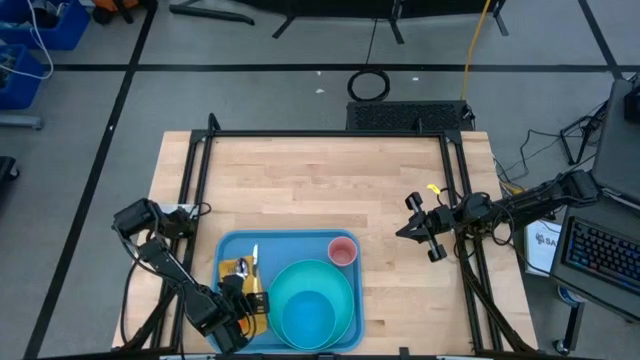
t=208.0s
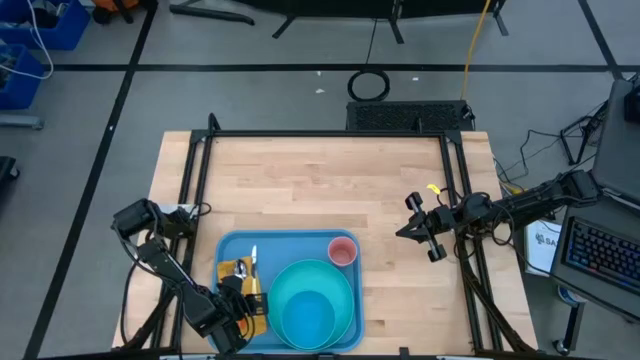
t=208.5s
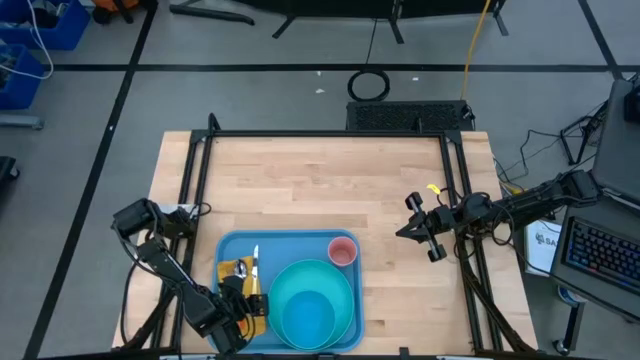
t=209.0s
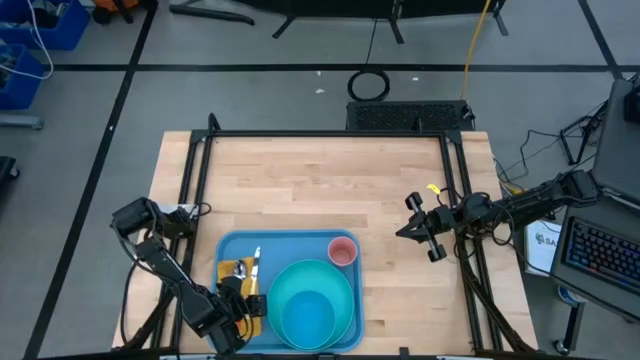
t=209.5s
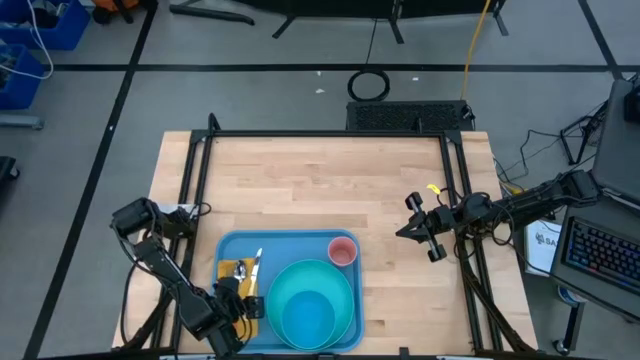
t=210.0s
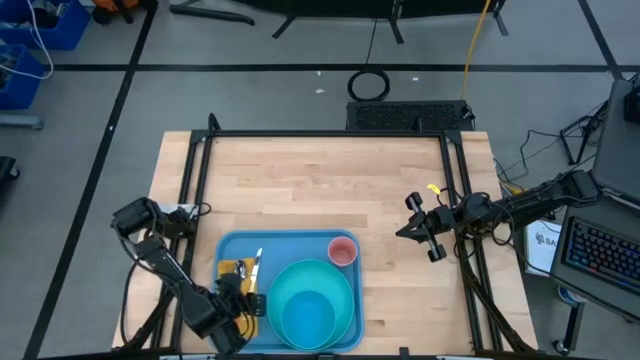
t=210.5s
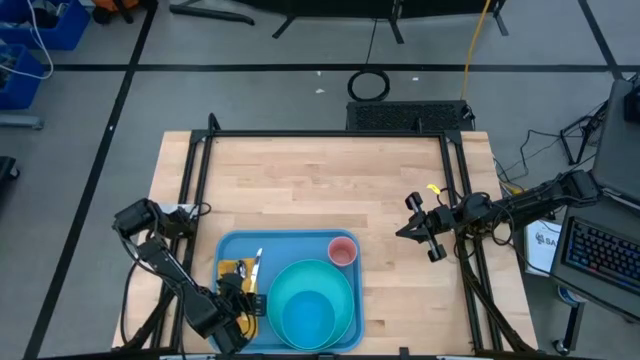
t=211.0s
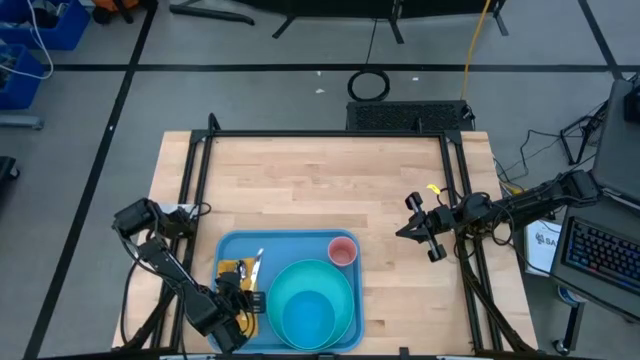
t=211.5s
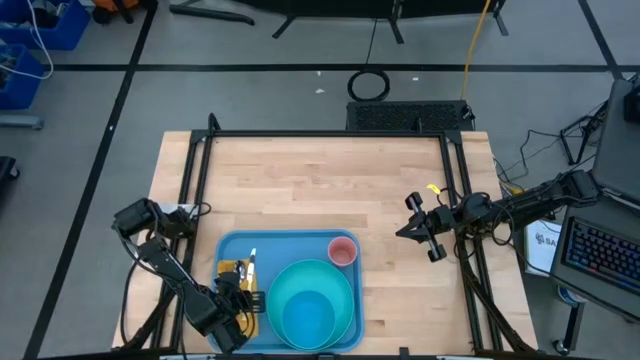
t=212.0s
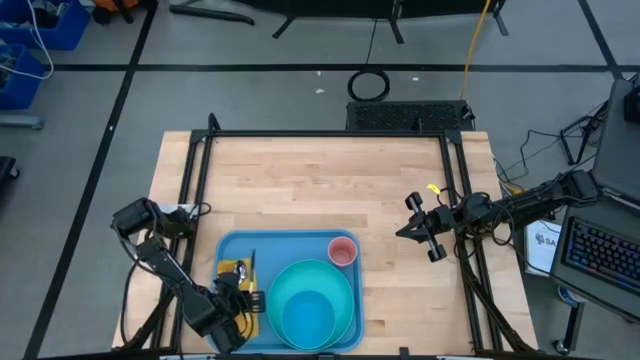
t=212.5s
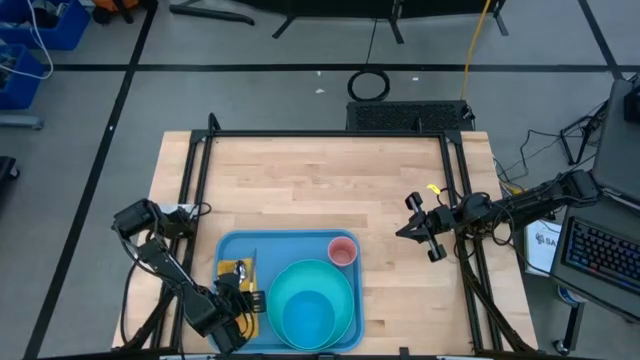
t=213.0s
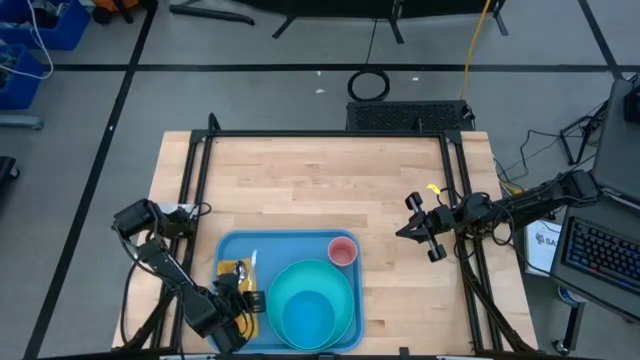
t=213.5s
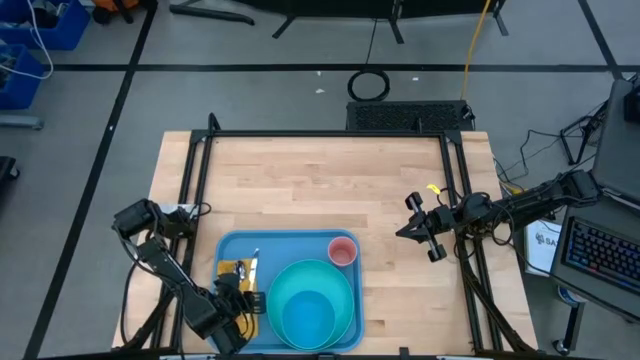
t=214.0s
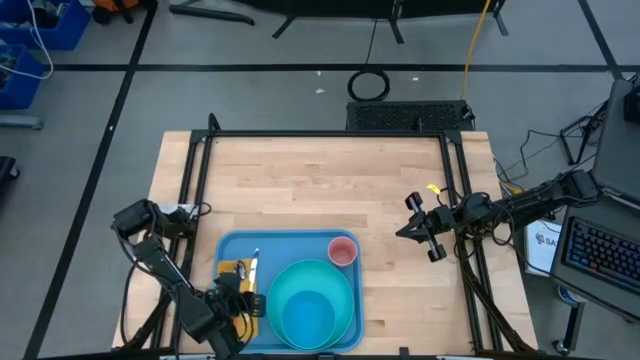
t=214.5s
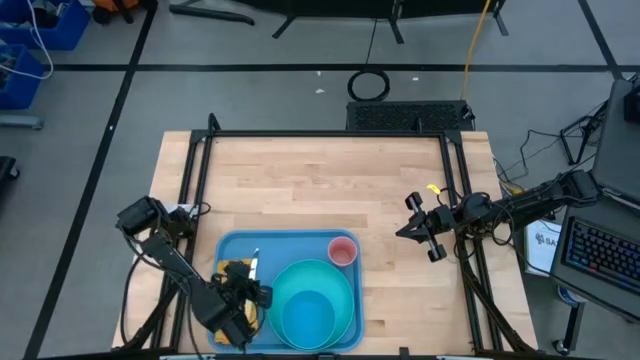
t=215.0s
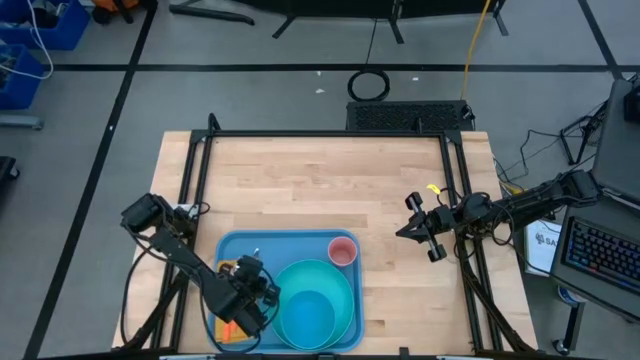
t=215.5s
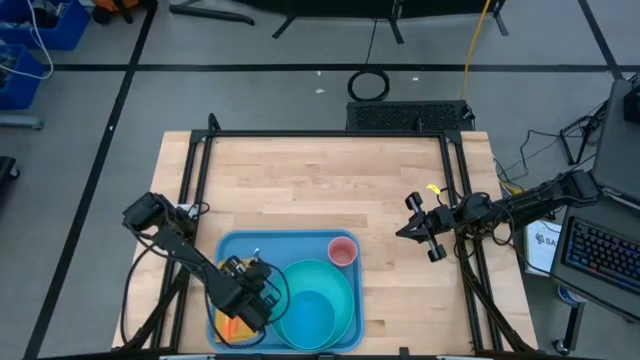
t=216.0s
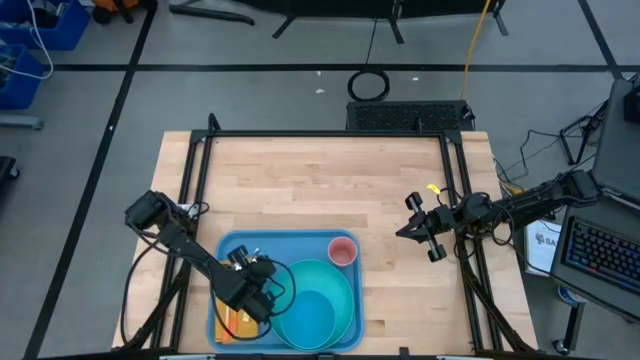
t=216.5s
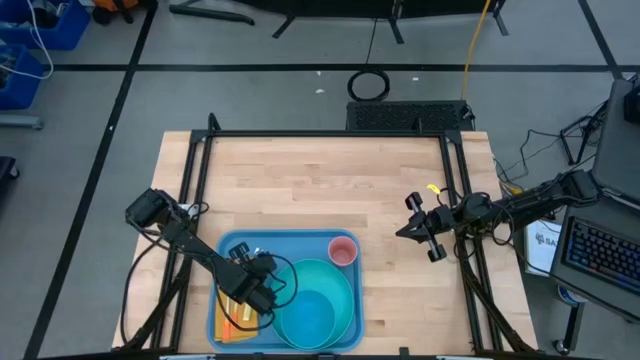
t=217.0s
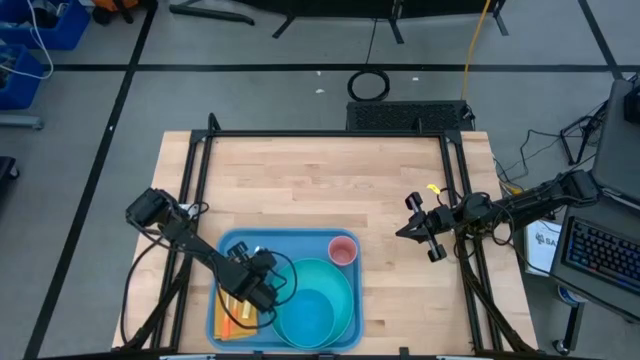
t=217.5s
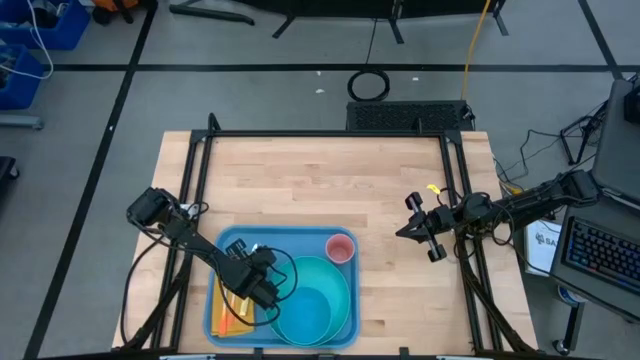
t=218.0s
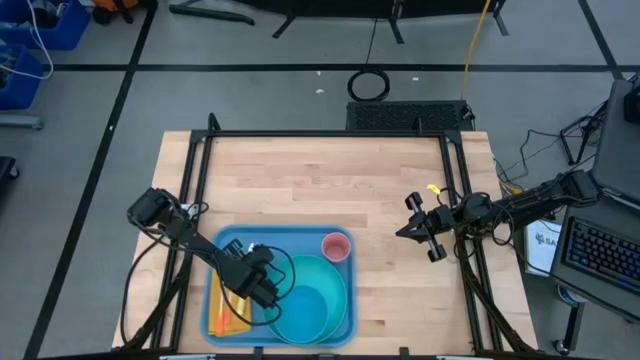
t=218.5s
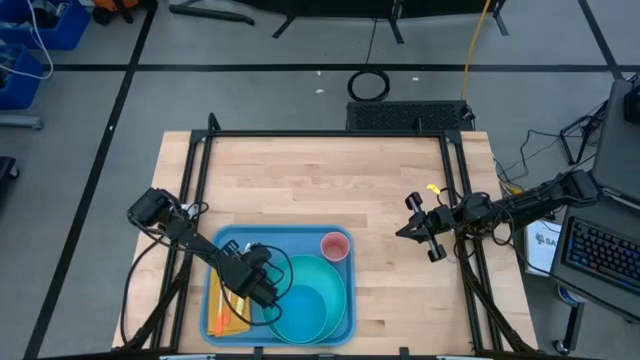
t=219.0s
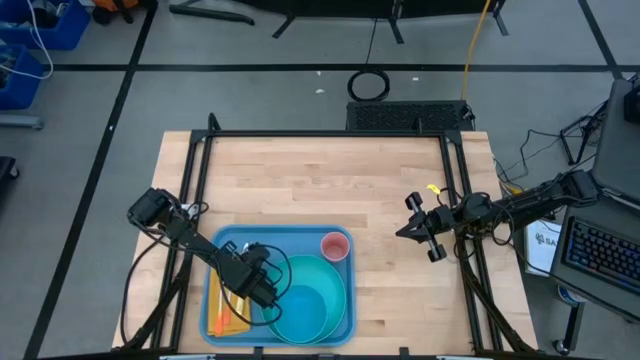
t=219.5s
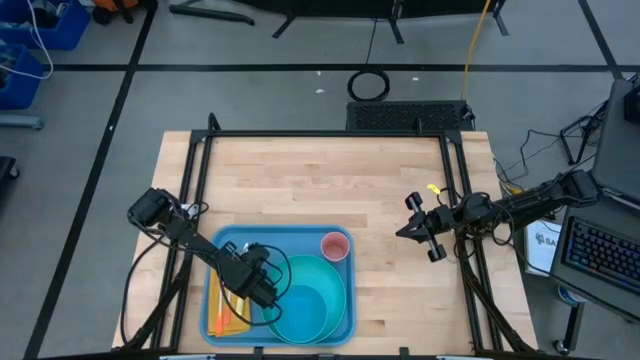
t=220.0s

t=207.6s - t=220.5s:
Task: Set up tray
Put the light yellow table knife to the right of the orange spoon on the yellow table napkin

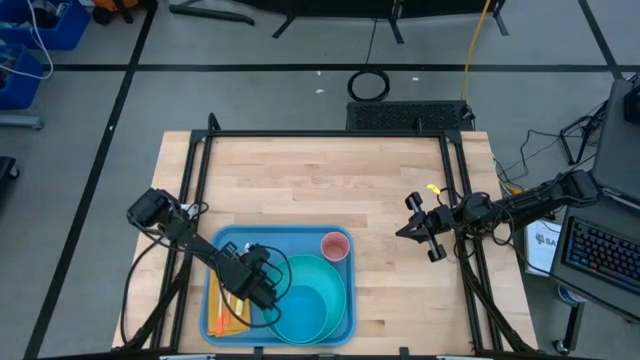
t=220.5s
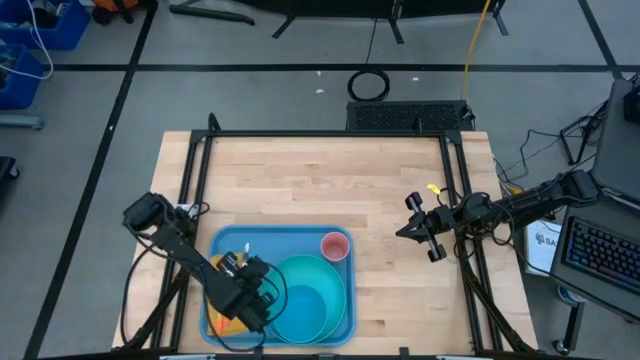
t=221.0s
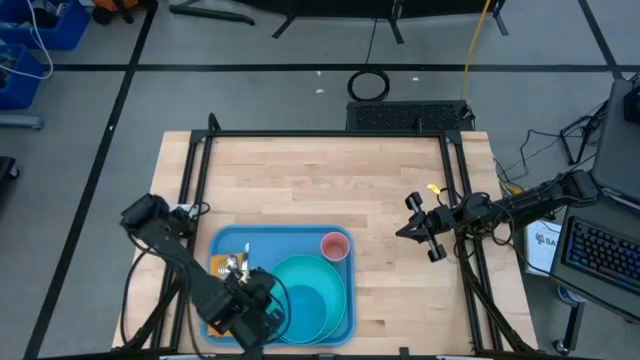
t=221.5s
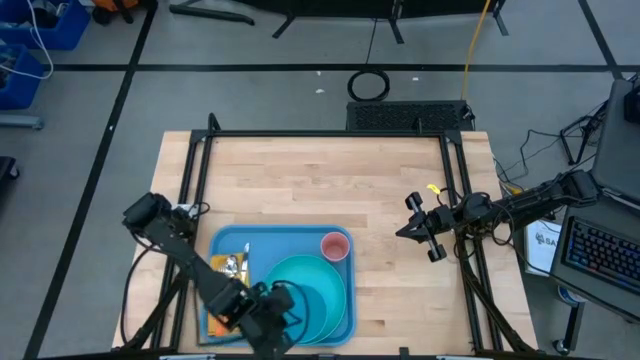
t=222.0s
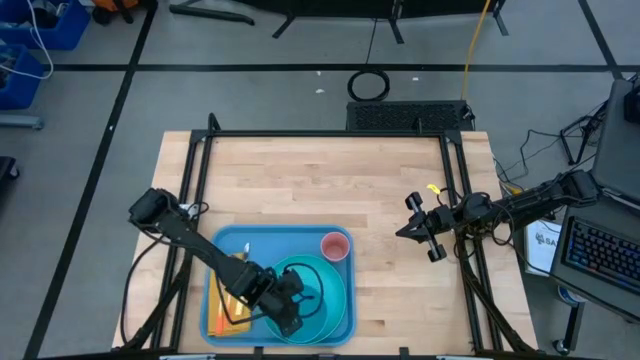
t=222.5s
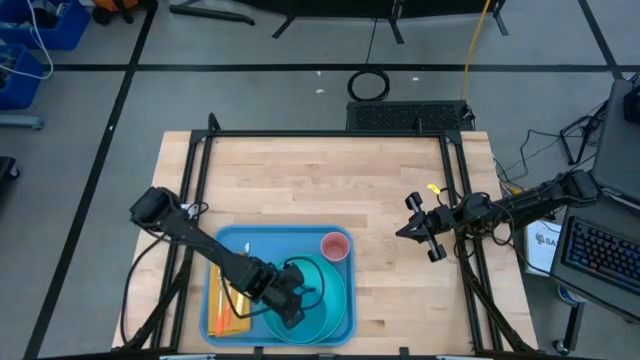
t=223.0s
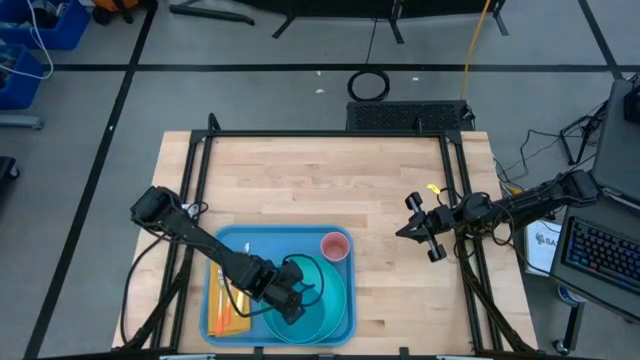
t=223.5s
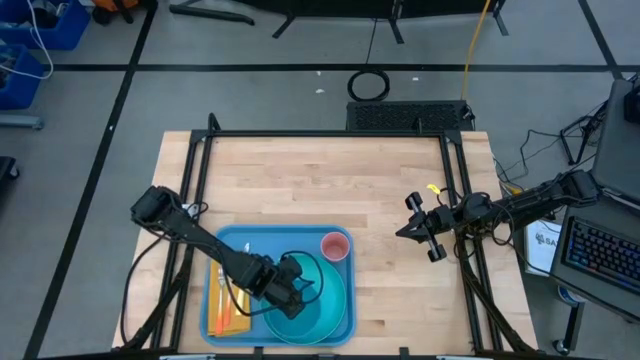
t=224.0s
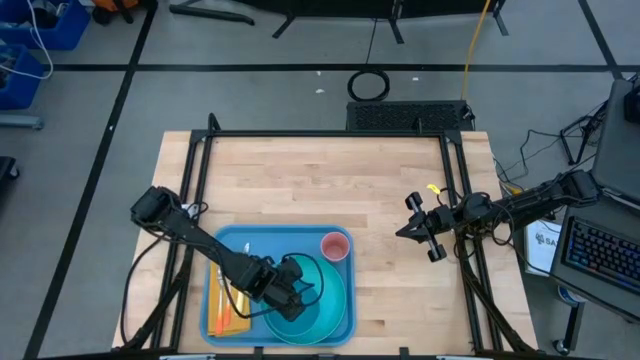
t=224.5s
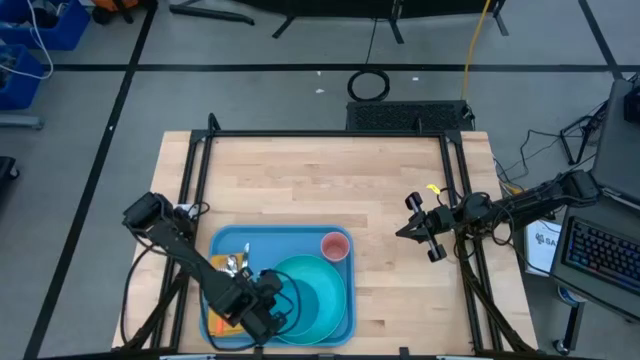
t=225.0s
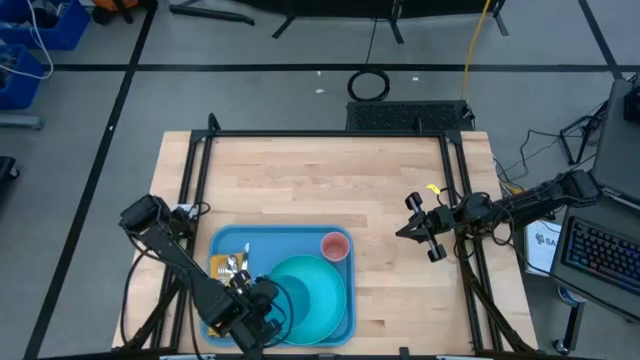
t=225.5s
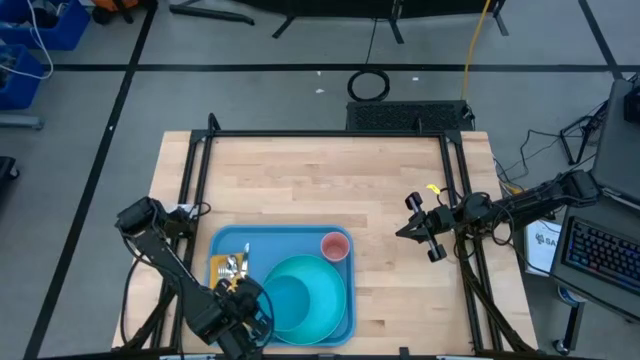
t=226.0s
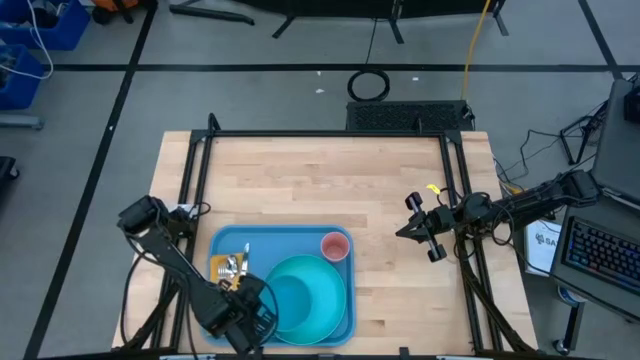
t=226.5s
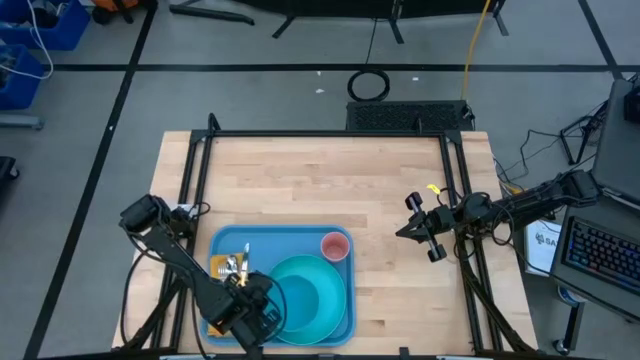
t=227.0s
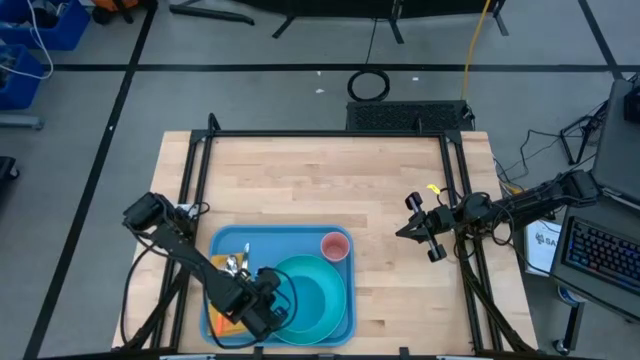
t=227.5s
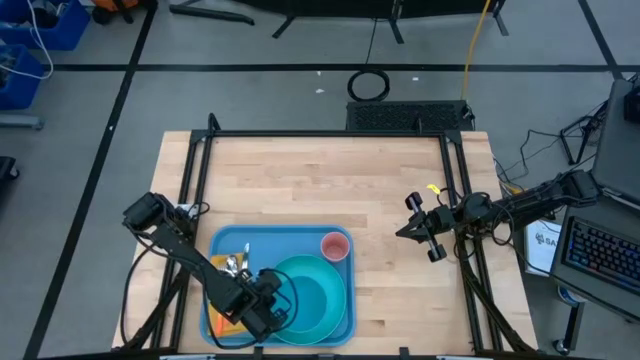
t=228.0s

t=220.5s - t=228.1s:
Adjust the blue bowl on the green plate in the blue tray

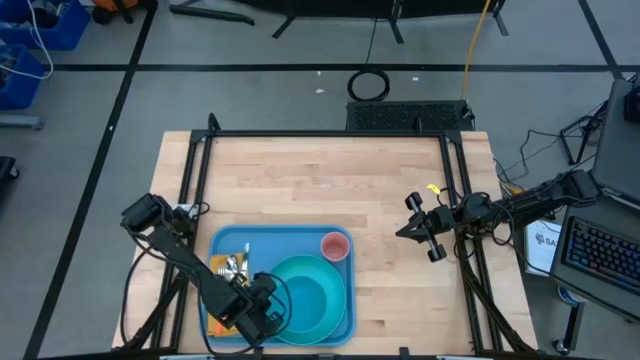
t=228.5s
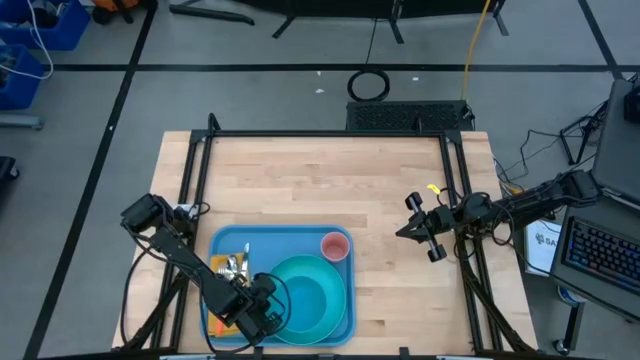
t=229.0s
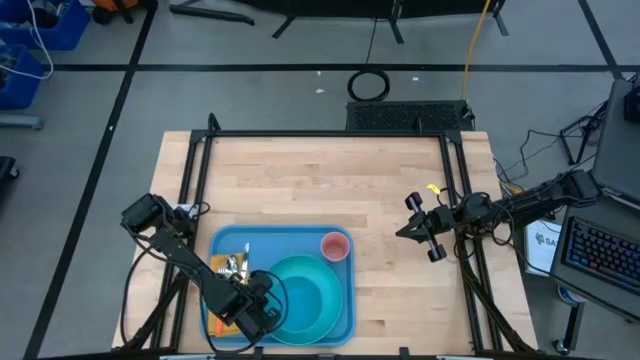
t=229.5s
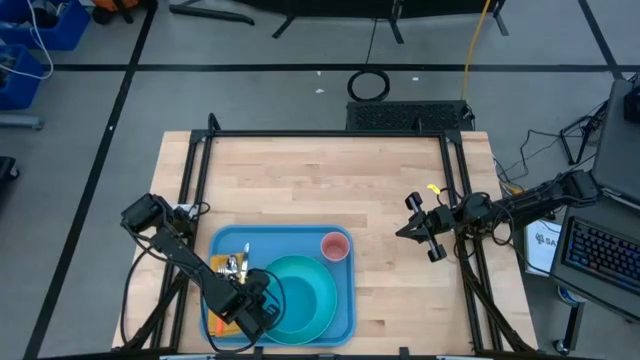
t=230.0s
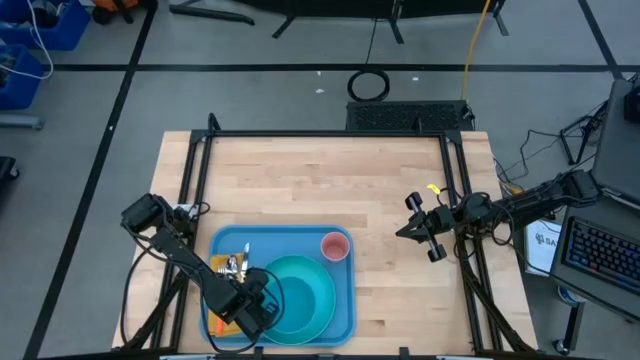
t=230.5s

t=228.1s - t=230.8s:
Adjust the green plate on the blue tray
